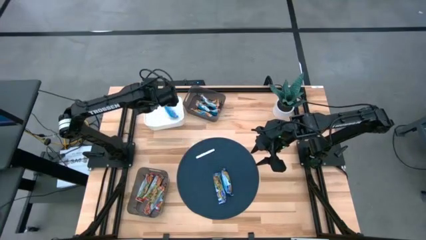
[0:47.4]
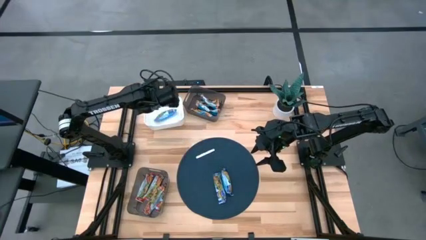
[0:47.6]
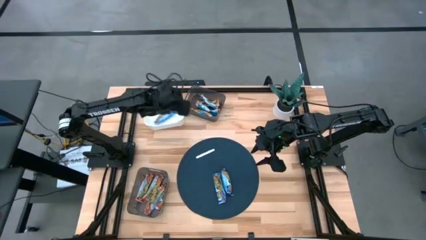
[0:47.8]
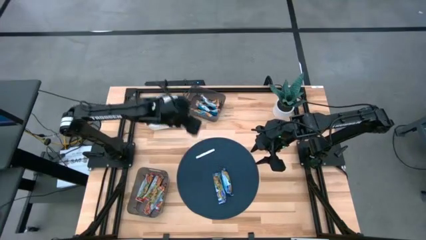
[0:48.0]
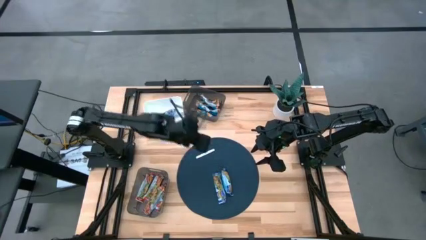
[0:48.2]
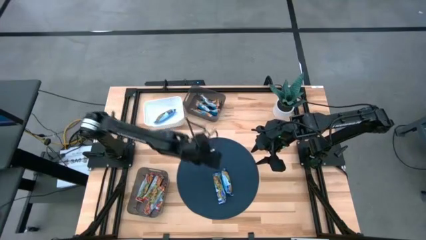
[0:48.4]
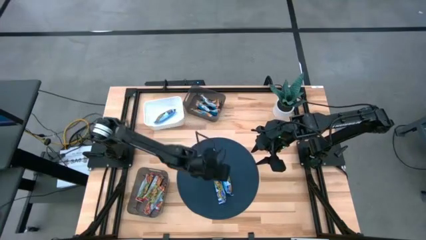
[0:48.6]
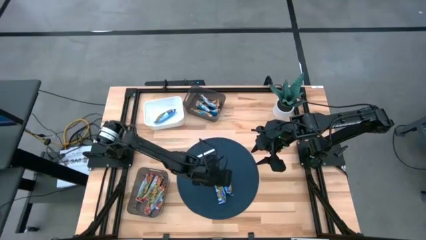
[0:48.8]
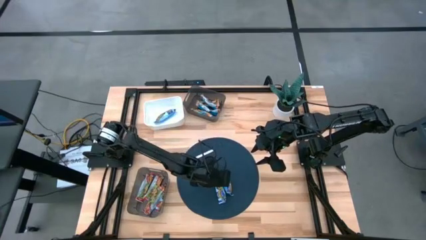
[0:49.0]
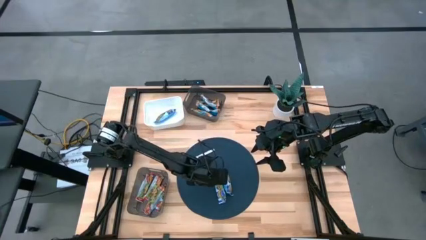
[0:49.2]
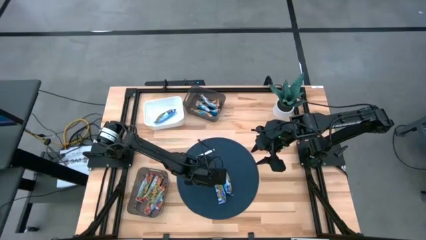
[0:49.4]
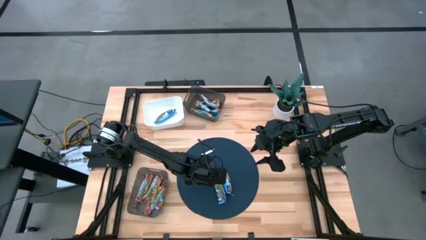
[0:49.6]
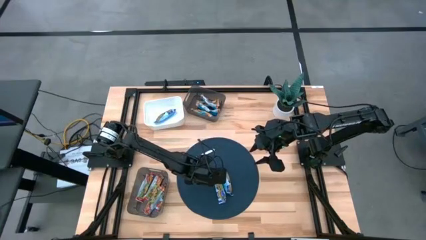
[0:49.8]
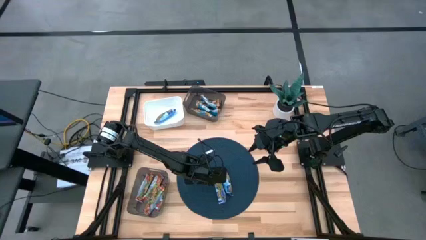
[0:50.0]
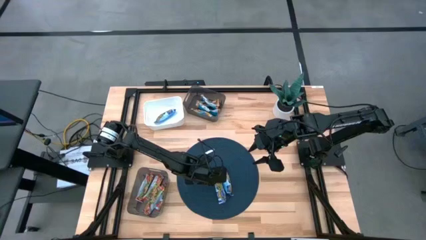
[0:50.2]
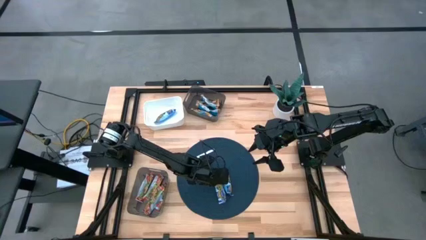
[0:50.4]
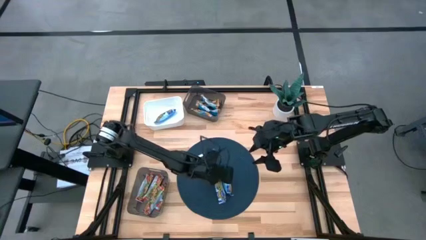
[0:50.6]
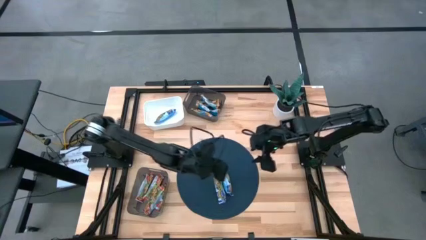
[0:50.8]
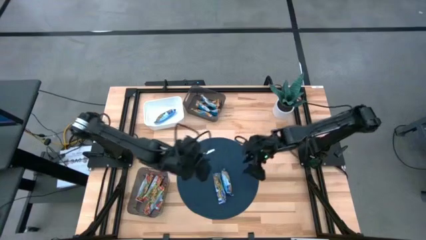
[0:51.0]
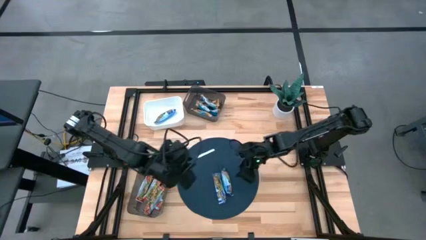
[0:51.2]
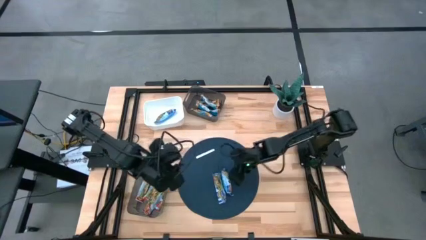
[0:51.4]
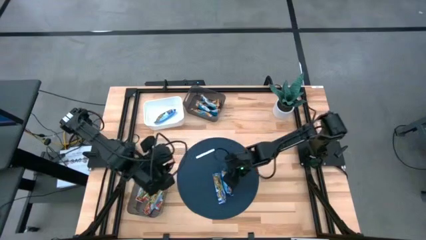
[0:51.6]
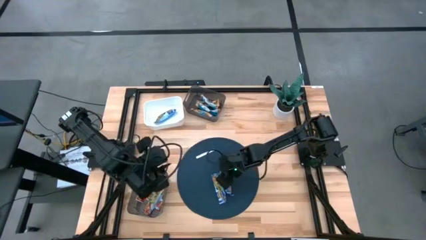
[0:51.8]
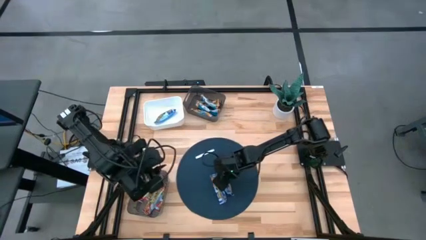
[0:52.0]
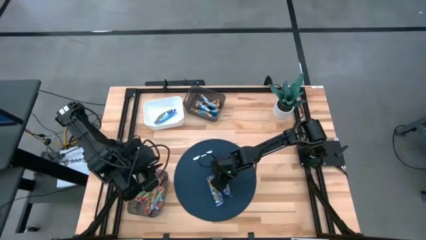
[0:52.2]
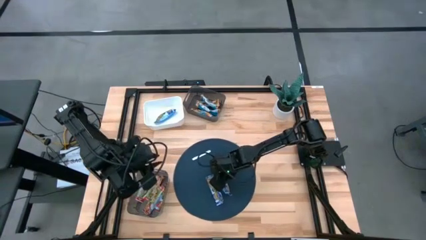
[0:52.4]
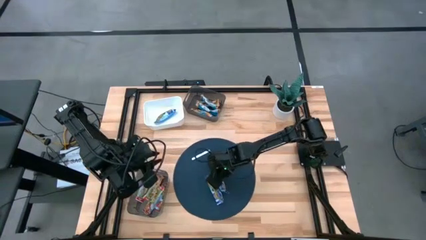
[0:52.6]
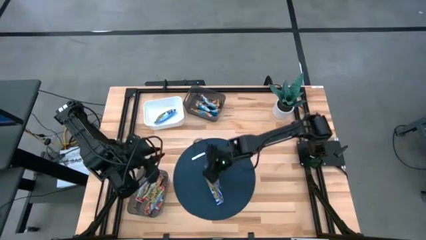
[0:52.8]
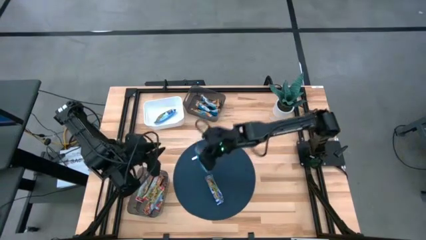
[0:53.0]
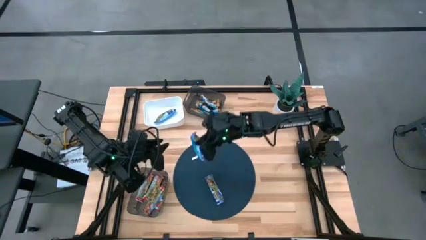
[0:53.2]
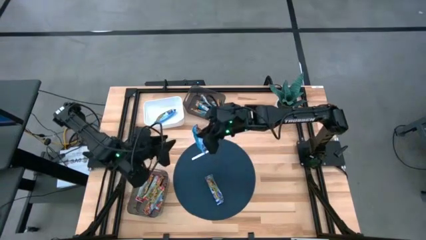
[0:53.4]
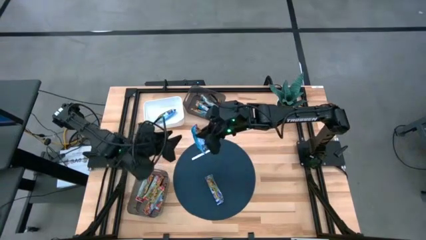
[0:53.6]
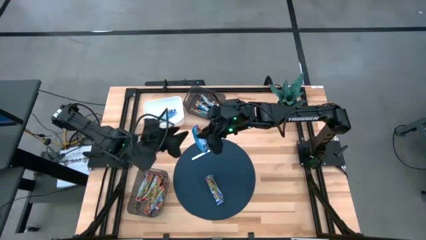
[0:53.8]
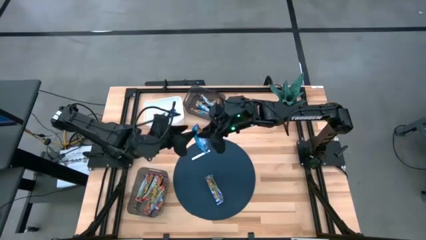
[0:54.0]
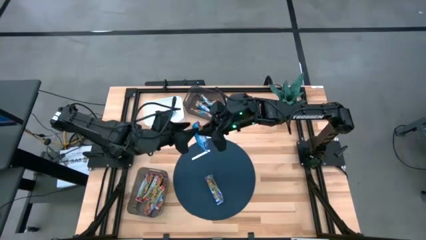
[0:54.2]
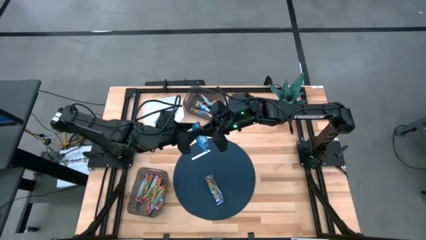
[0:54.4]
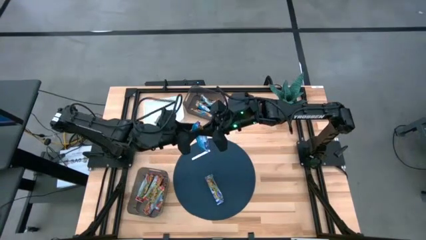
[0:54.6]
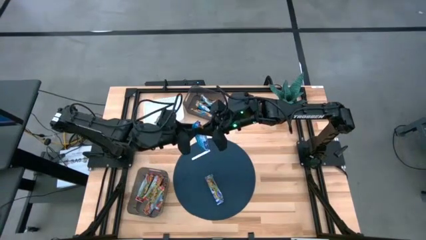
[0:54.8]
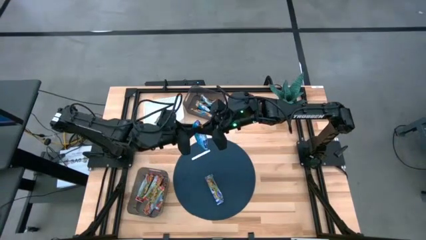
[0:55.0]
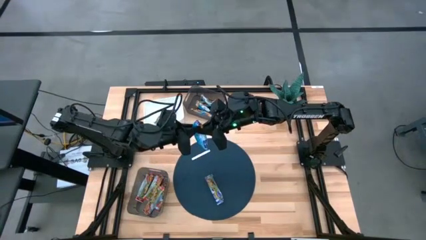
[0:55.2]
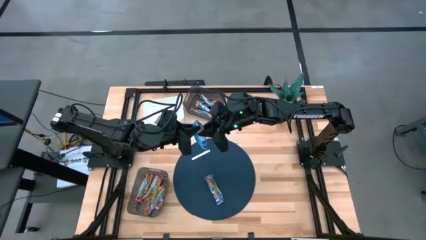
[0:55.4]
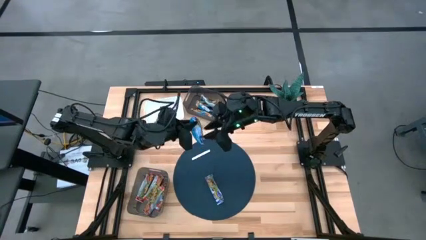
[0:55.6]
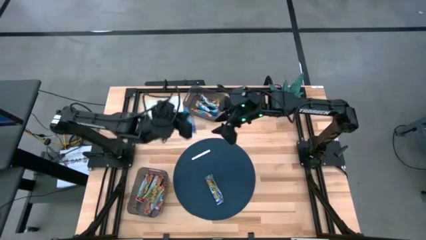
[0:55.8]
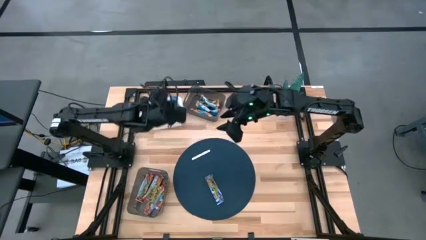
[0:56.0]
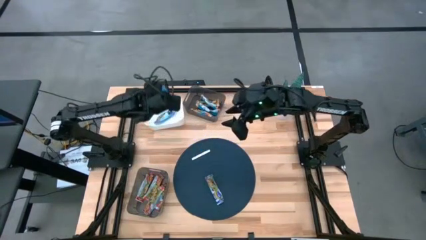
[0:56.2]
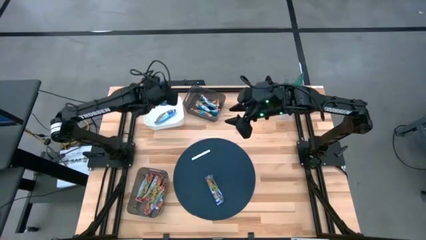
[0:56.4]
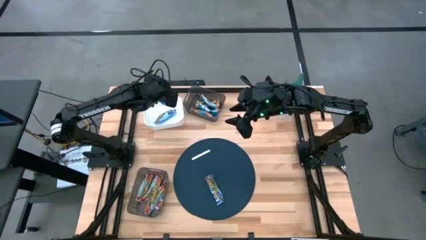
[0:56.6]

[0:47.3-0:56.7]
Task: Pick and place Granola Bars by type
Put the blue granola bar into the white bin

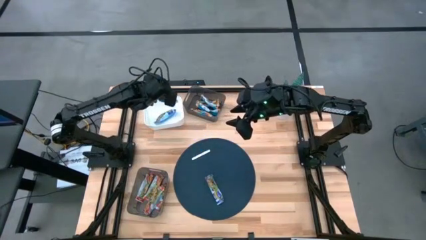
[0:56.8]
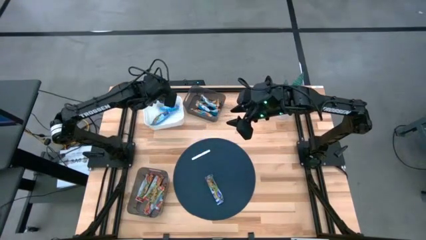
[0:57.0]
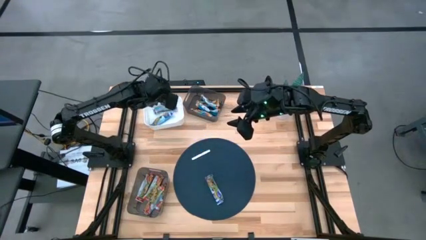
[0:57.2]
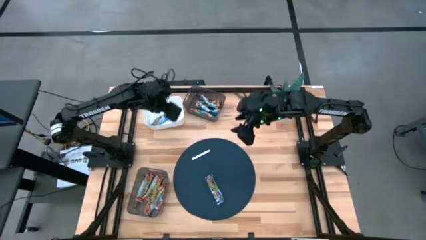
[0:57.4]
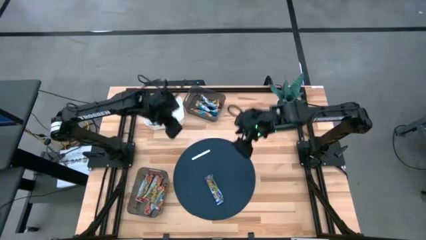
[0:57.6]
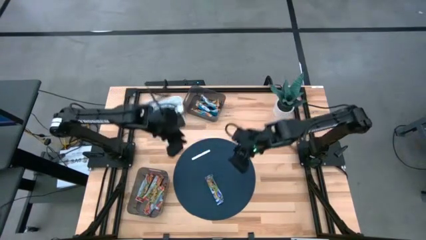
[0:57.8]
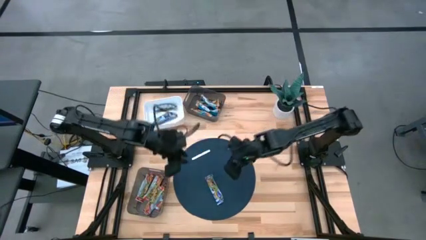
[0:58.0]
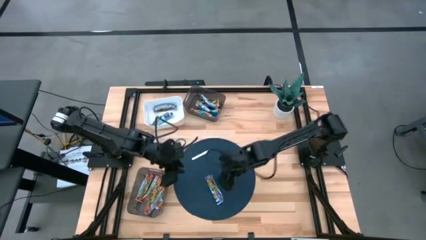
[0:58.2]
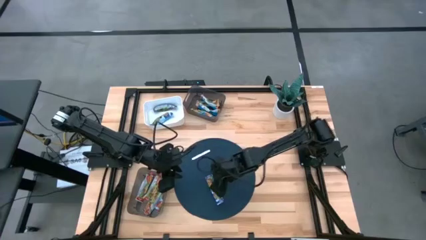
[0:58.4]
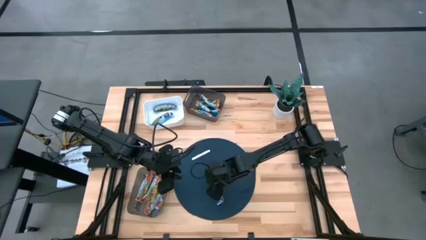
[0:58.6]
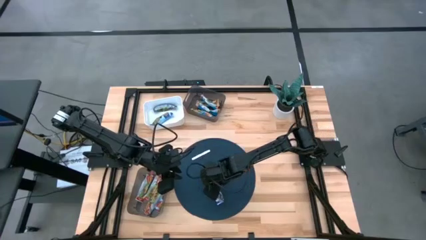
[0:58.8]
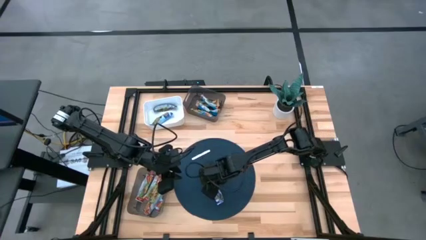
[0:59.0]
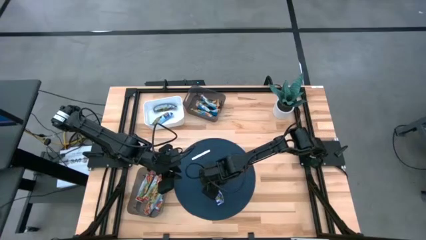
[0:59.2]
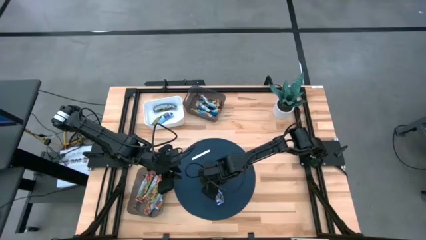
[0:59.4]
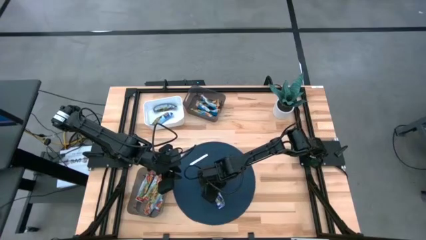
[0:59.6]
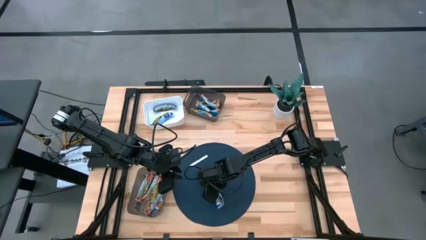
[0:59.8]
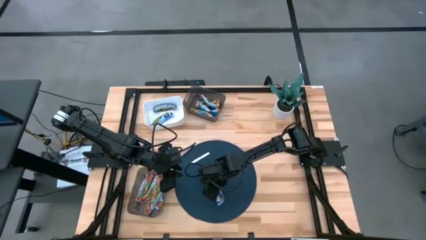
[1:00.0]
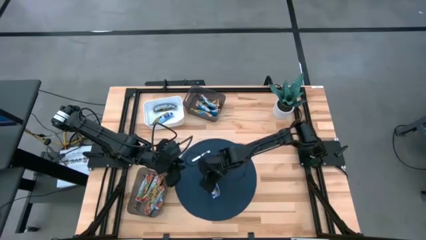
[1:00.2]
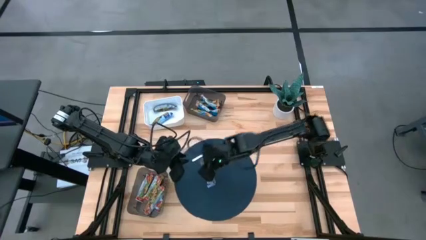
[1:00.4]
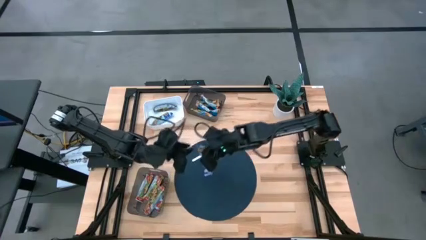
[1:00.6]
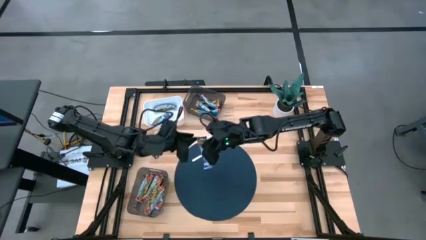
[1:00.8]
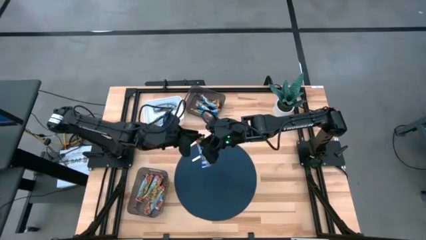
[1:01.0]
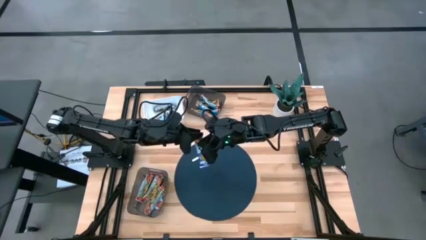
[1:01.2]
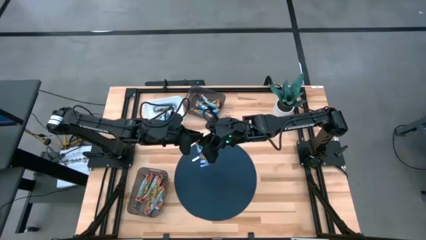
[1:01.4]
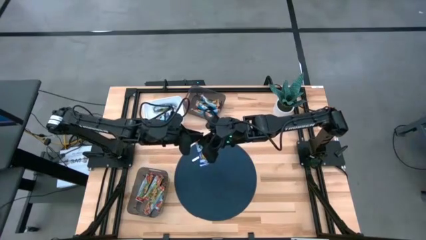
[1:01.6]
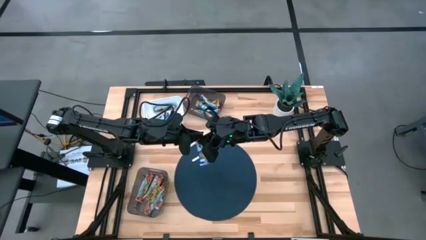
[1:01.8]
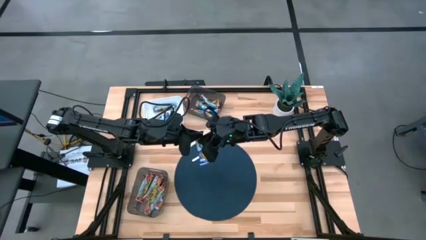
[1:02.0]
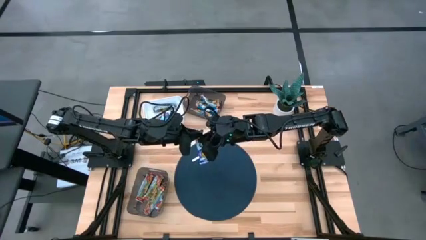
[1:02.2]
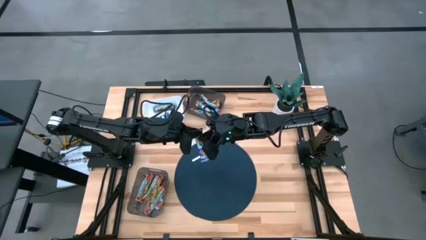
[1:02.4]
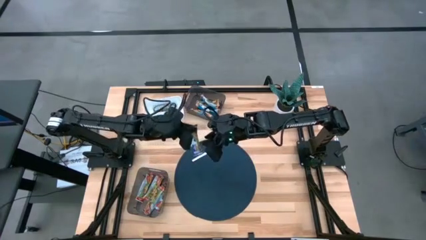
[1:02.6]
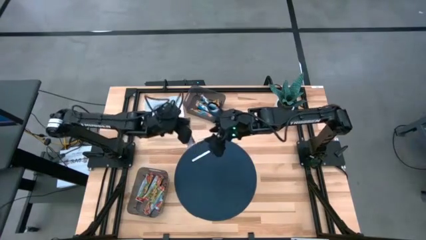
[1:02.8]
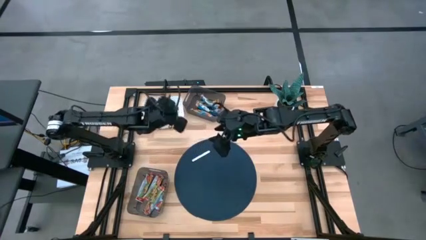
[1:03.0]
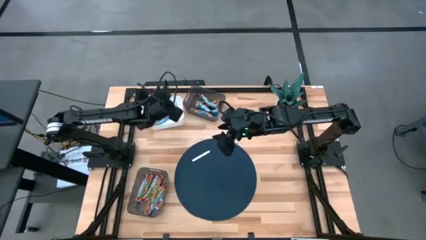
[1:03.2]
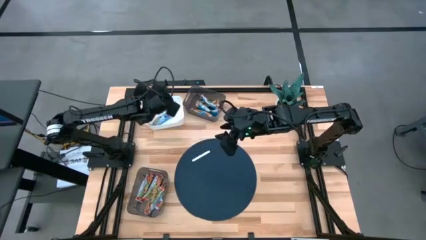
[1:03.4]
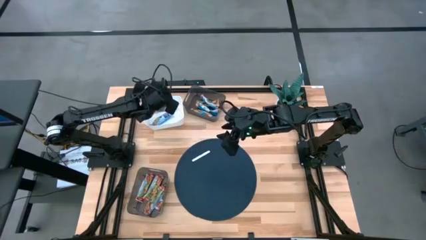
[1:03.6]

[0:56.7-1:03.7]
Put the blue granola bar into the white bin

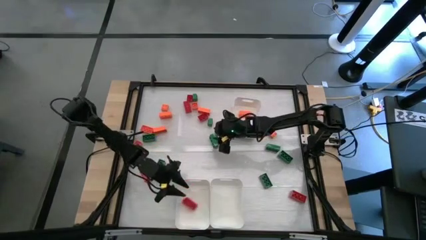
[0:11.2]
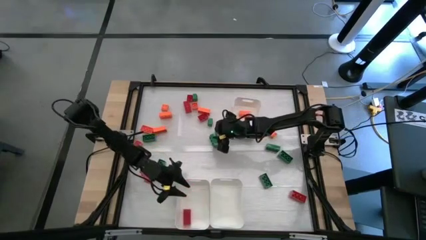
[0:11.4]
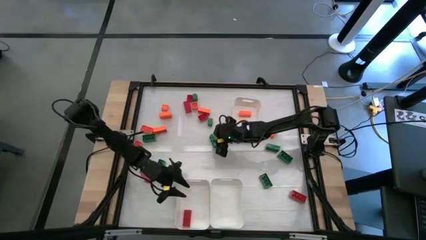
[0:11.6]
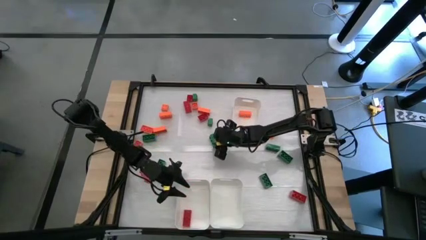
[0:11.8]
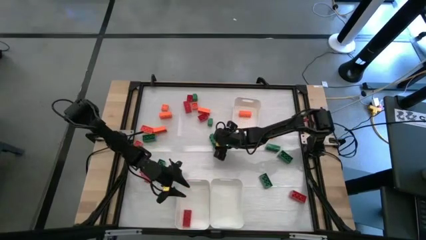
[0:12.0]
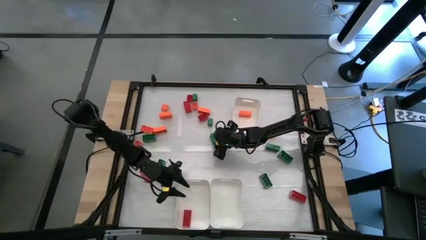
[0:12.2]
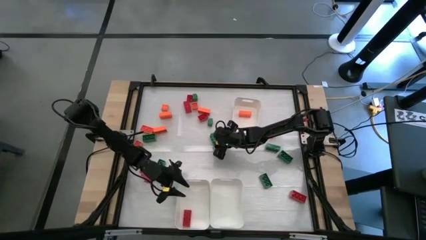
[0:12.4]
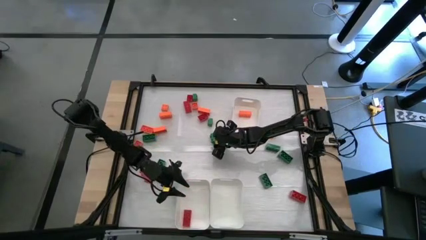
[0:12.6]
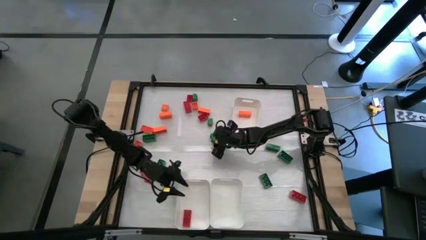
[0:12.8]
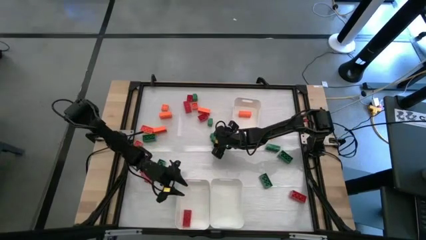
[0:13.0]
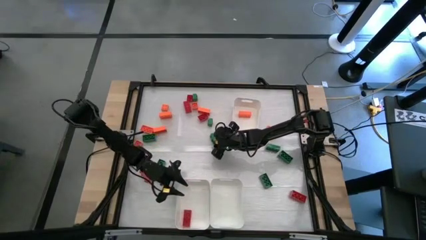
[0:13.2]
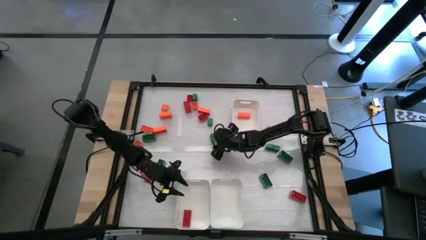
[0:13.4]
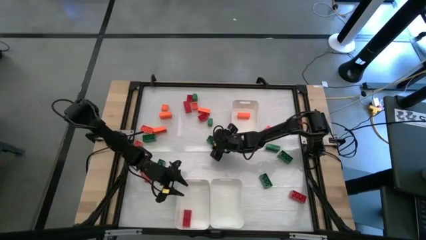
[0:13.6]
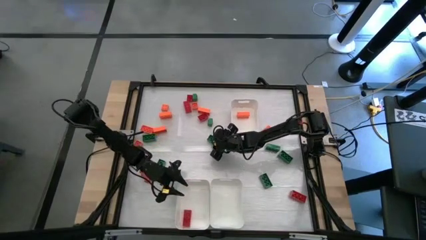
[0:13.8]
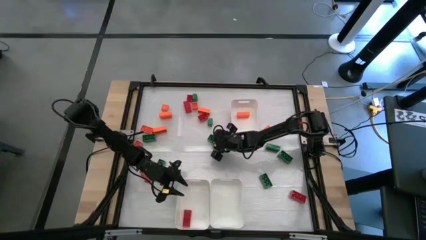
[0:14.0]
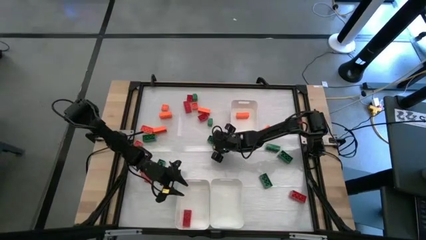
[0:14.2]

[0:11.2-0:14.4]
Task: Sort blocks
Put the green game piece into the bottom right white bin
